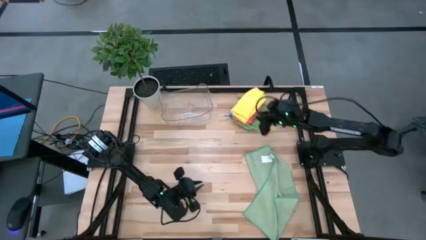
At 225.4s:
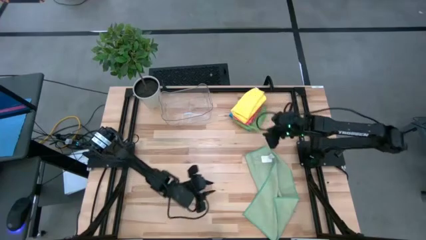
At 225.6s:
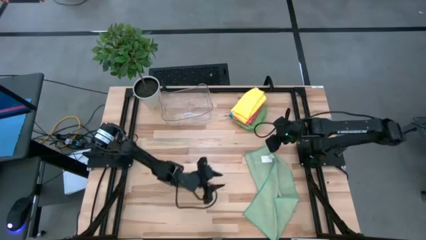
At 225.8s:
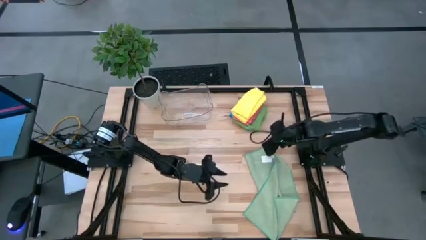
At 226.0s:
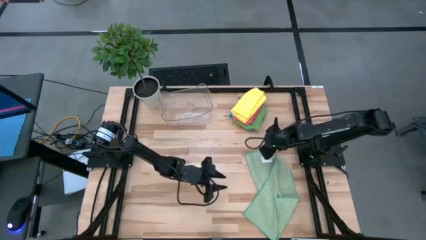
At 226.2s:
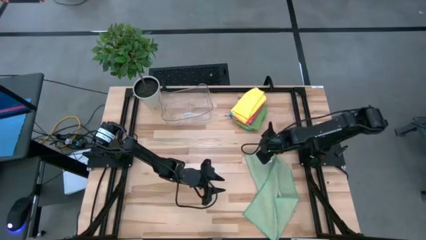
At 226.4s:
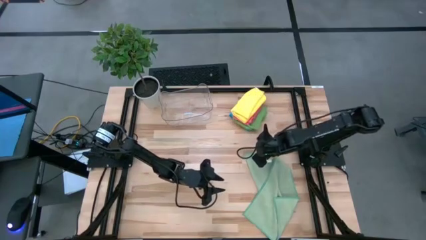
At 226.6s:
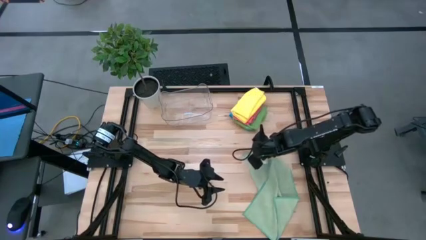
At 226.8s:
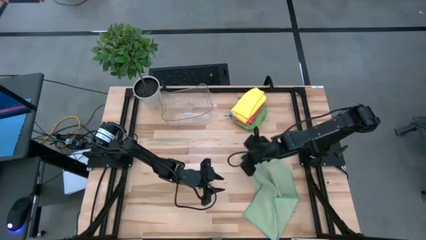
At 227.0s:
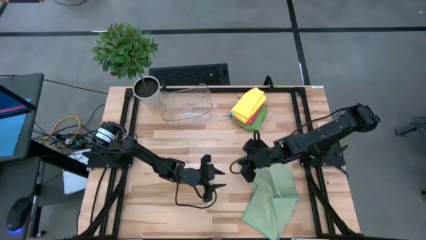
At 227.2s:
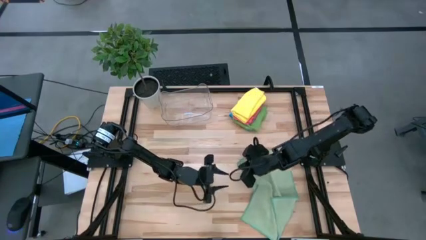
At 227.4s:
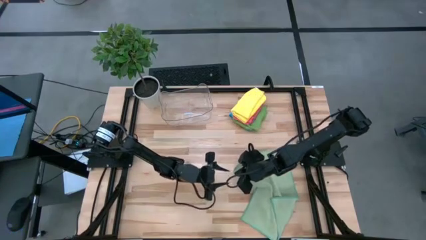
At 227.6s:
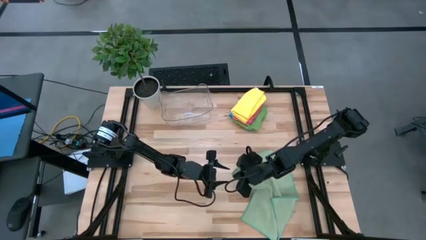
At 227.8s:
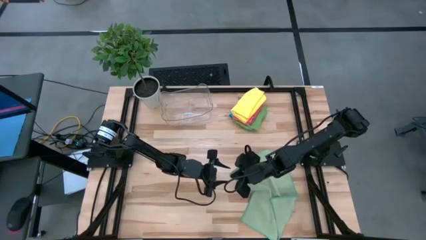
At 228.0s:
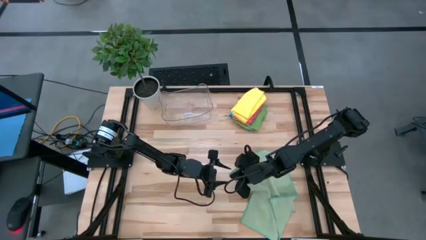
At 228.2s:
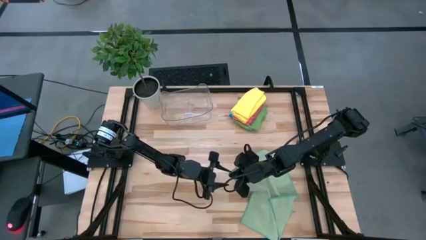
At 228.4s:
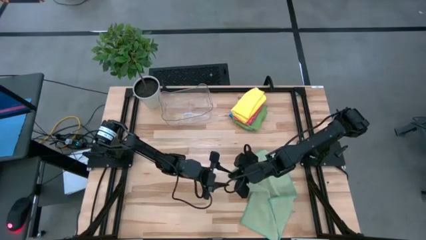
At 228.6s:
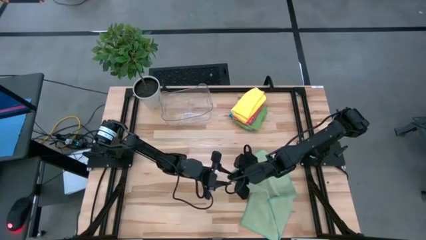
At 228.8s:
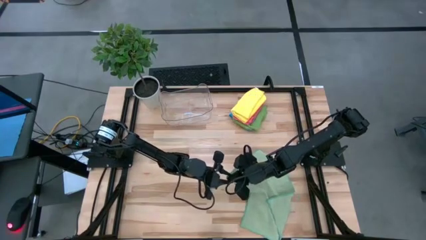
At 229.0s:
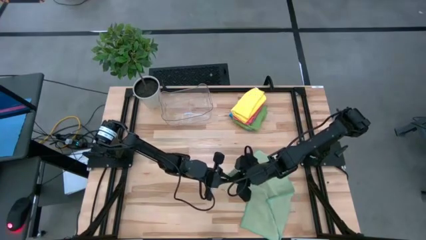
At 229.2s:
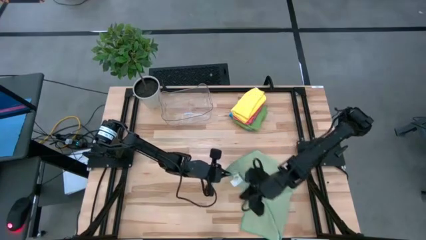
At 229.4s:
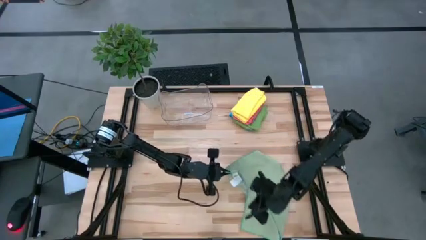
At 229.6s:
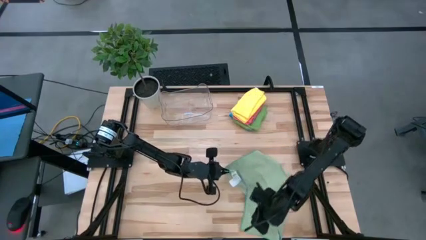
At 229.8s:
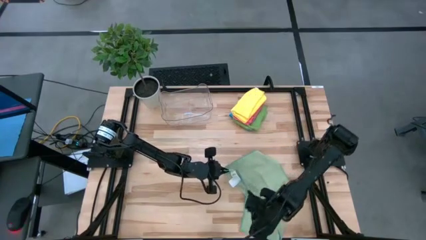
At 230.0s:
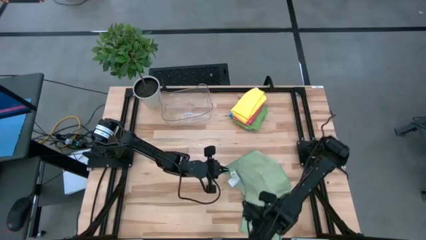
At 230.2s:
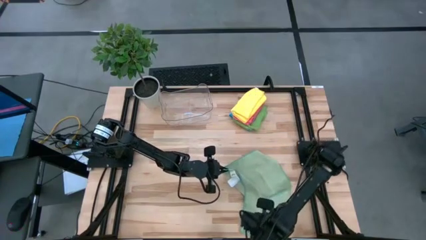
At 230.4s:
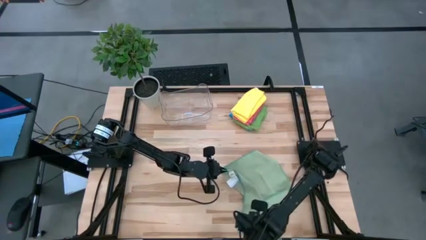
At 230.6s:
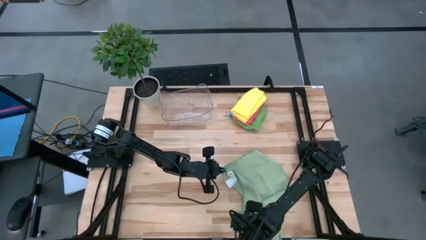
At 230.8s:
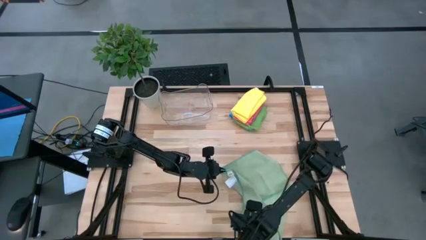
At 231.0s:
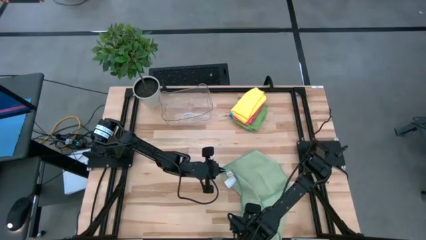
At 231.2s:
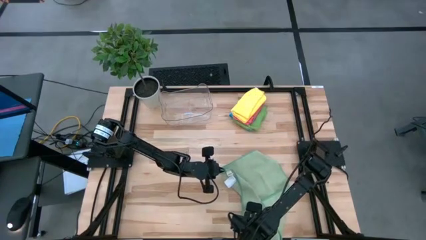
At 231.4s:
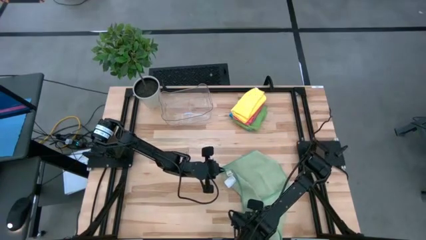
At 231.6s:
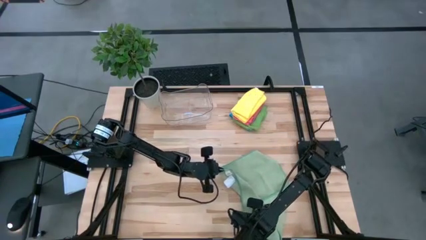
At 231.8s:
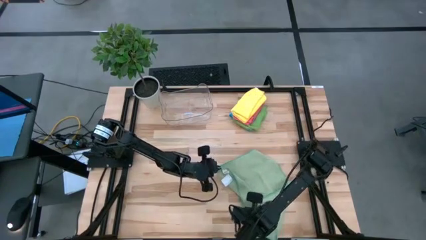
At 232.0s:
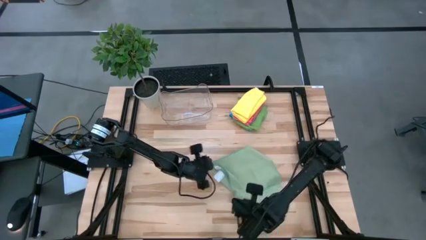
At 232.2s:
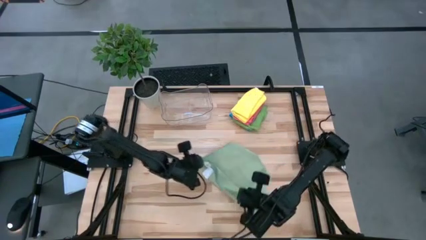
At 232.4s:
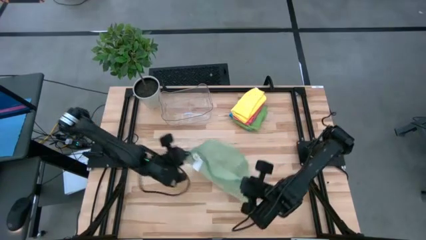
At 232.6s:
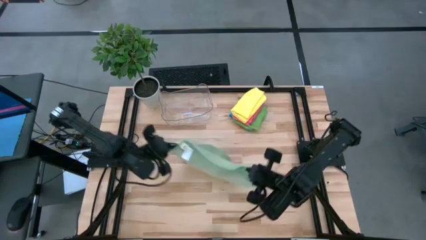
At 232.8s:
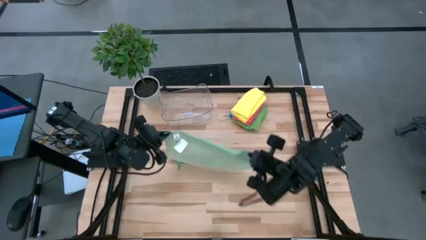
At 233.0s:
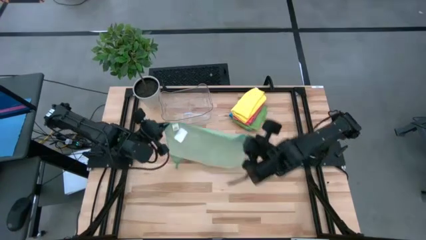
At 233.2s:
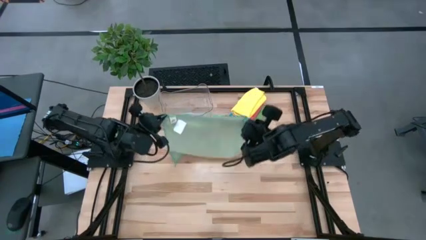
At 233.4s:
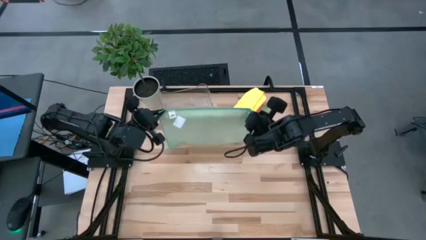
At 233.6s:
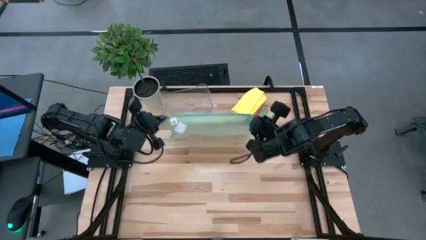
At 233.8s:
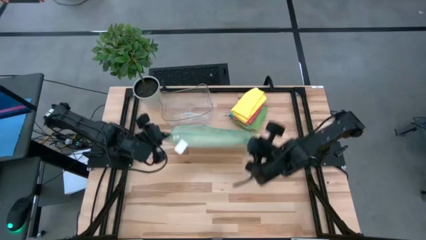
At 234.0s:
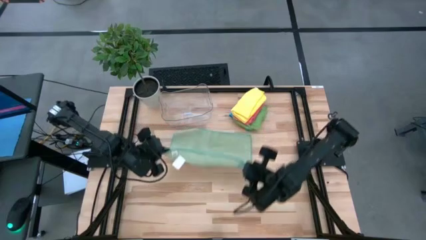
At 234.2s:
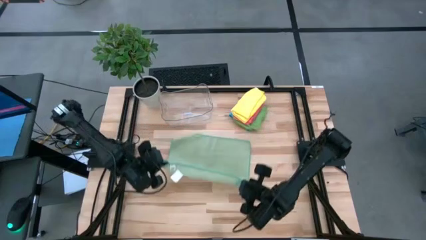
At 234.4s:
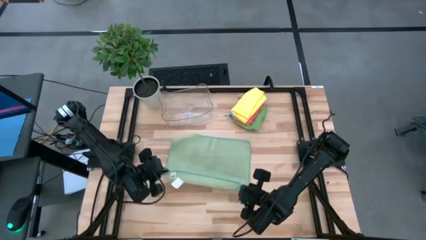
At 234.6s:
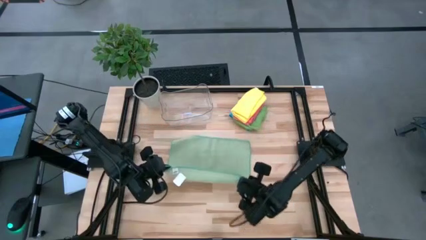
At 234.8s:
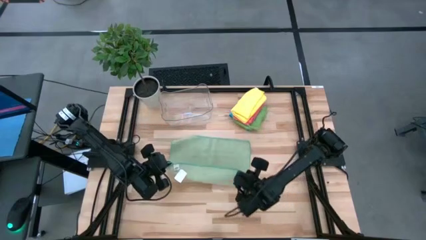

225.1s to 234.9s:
Task: Fold microfiber towels
Fold the light green microfiber cloth

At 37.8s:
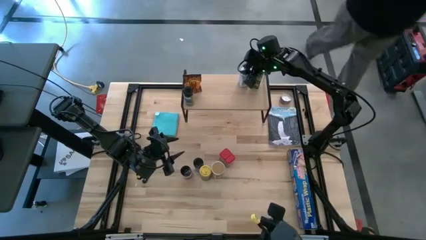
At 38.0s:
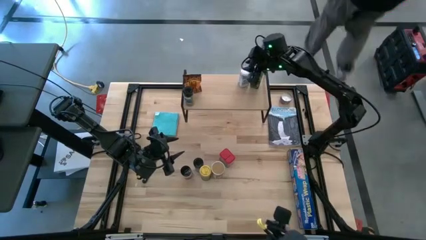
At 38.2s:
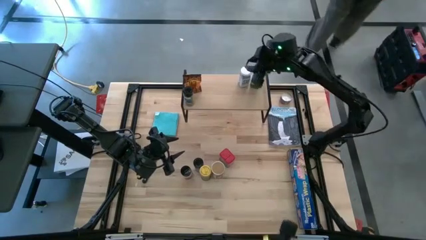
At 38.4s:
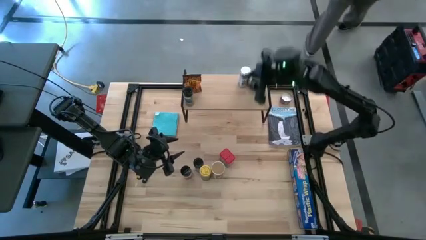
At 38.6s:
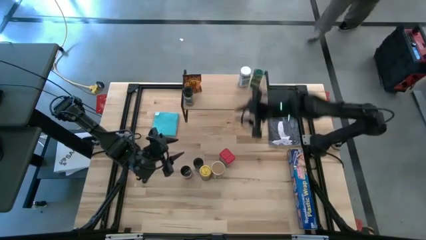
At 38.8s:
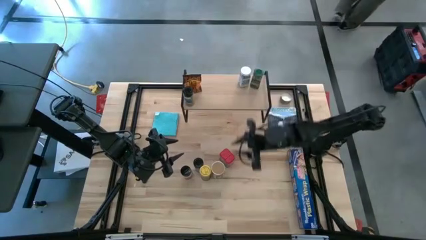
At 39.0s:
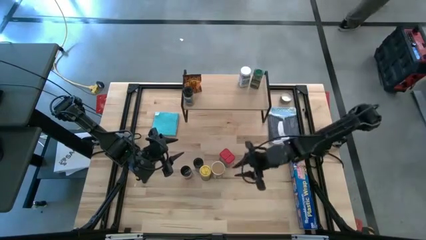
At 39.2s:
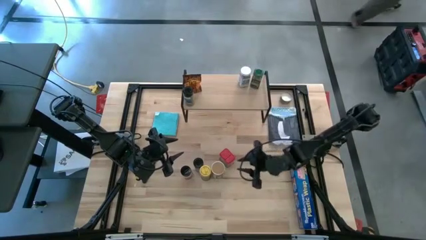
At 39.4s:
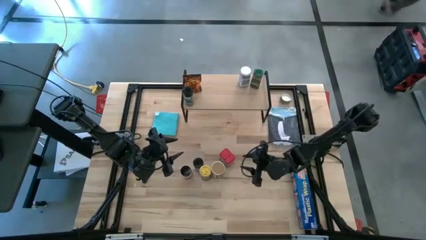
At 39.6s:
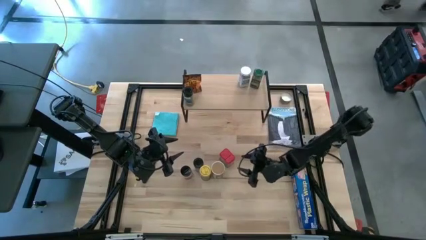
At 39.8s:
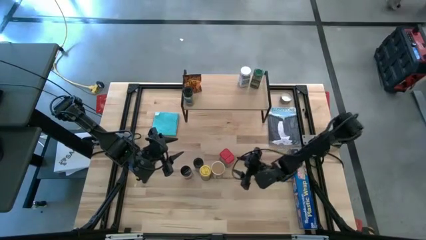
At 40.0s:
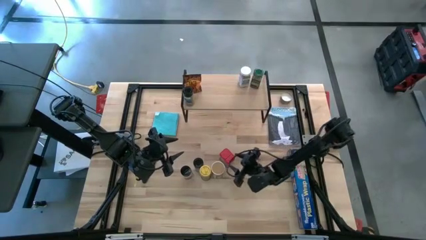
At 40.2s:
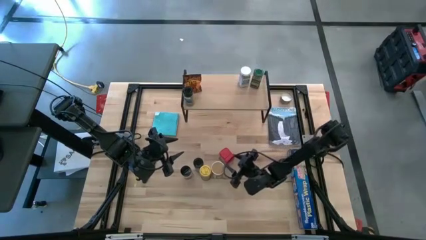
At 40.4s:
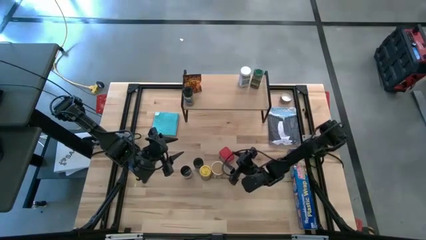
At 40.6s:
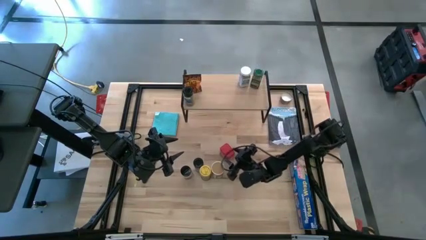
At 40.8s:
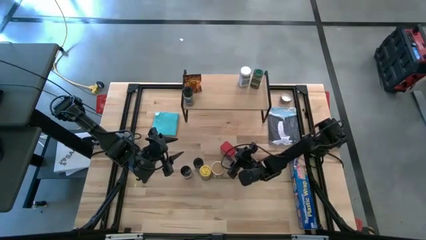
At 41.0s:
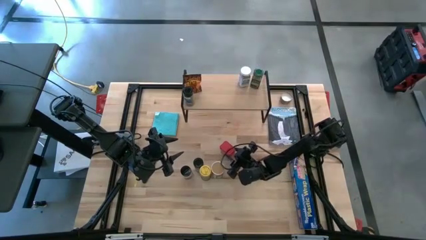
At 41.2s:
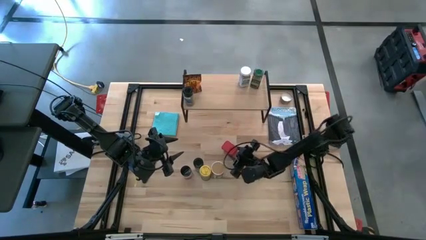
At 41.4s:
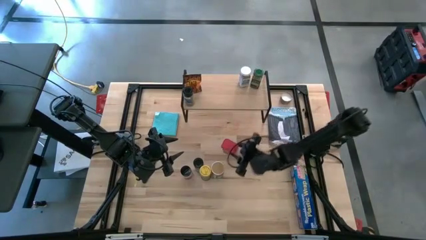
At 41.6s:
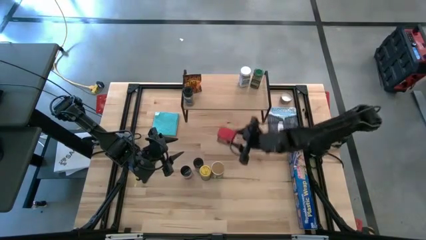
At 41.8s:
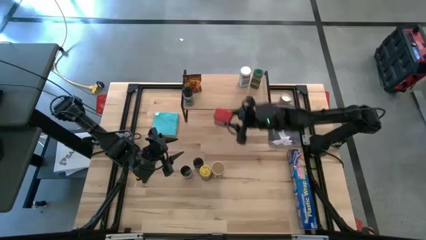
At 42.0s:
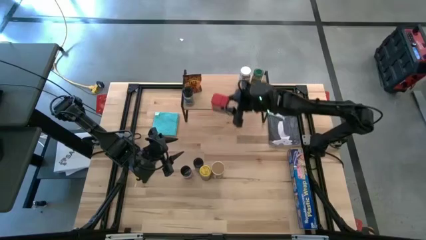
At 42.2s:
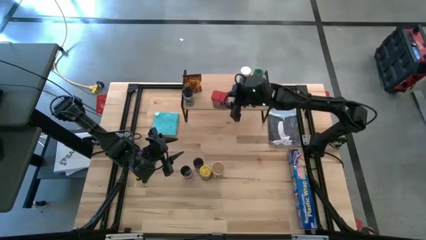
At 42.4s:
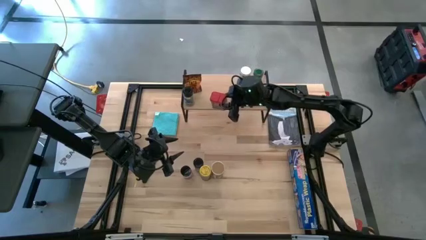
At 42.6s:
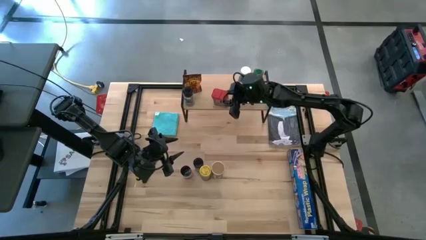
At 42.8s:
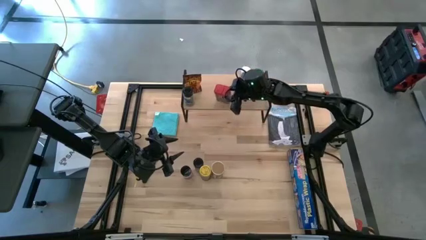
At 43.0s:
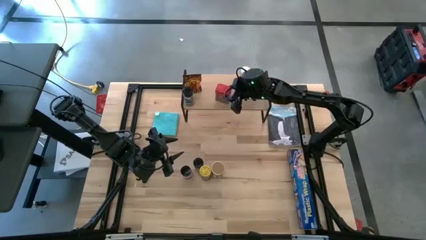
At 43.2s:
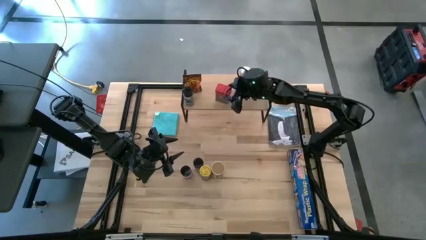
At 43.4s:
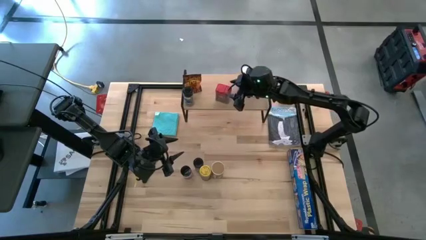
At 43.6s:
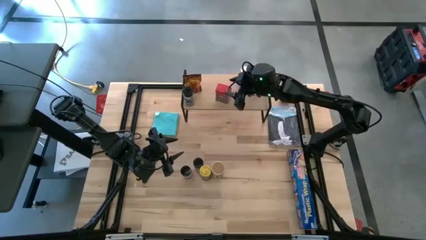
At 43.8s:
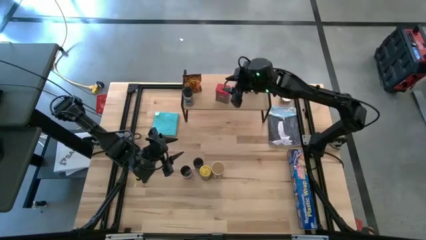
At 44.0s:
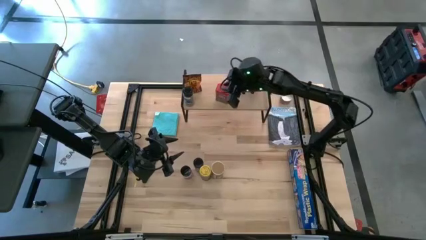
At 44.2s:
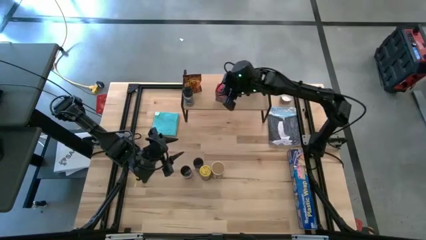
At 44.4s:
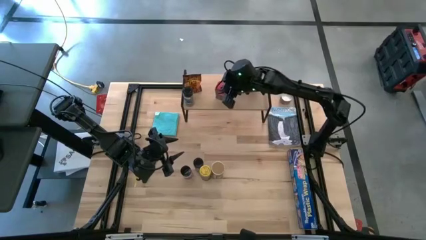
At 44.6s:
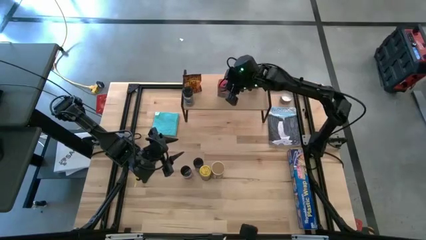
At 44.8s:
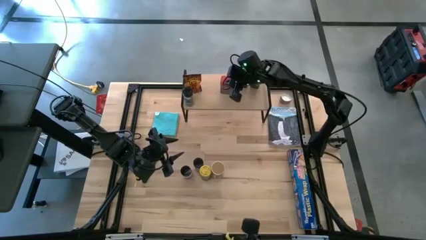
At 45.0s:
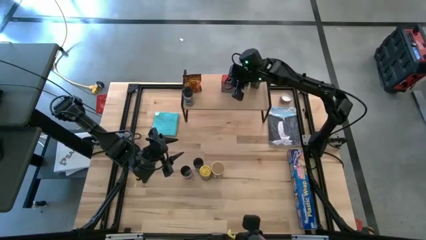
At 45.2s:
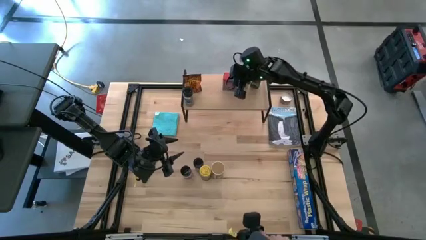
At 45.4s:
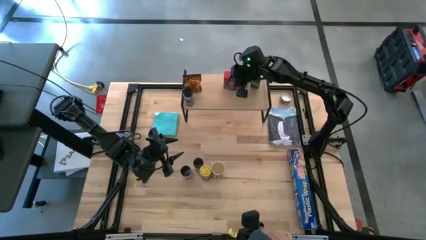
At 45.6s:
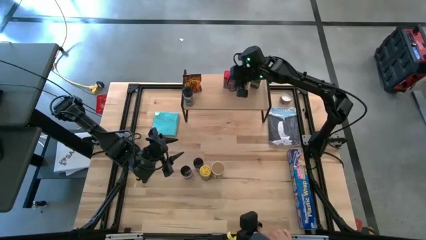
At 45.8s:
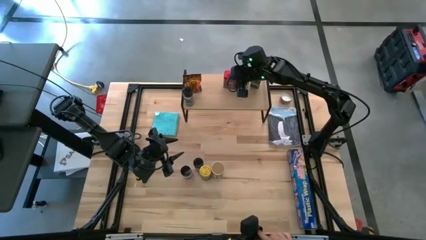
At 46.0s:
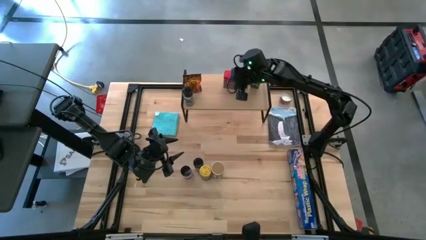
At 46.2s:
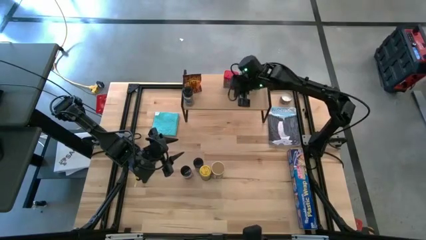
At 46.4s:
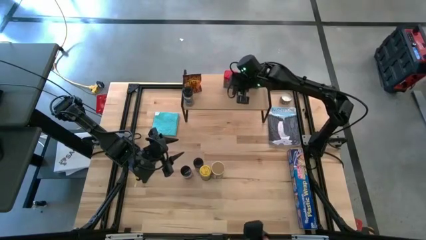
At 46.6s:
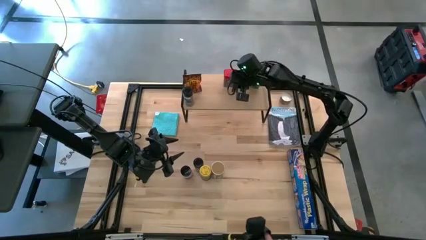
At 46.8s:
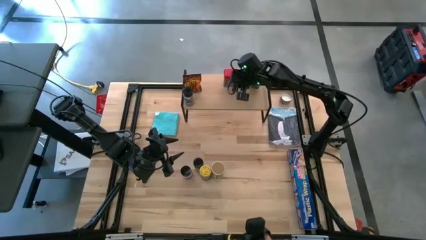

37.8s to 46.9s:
Task: Shelf spices
Put the red seasoning can on the shelf
